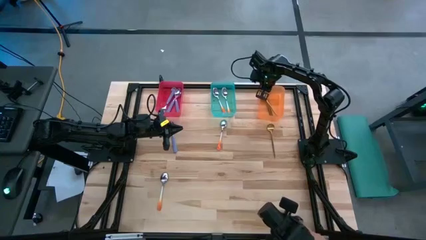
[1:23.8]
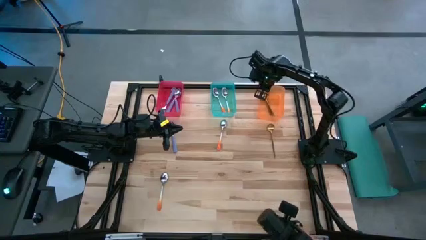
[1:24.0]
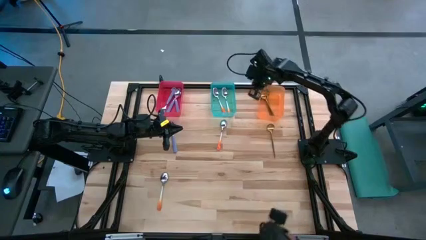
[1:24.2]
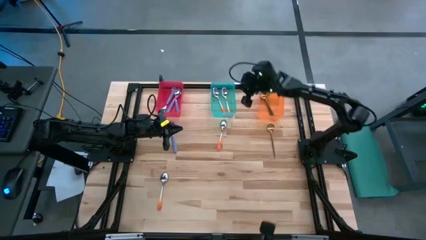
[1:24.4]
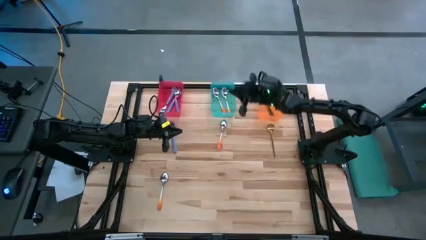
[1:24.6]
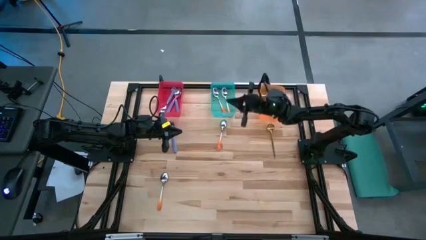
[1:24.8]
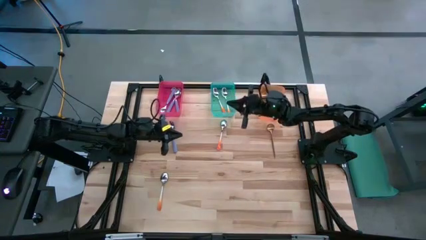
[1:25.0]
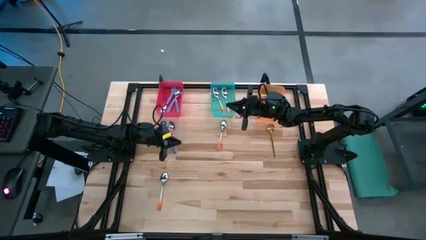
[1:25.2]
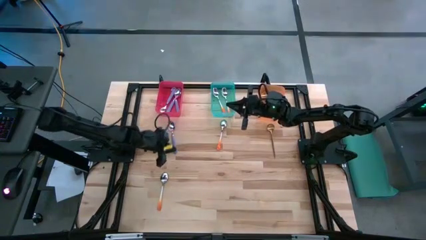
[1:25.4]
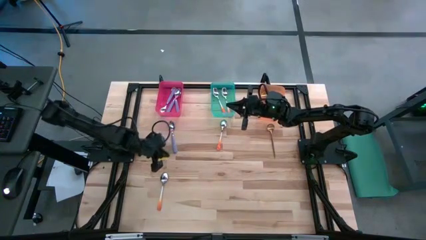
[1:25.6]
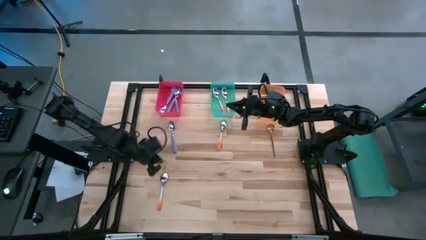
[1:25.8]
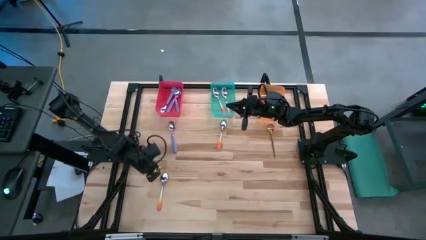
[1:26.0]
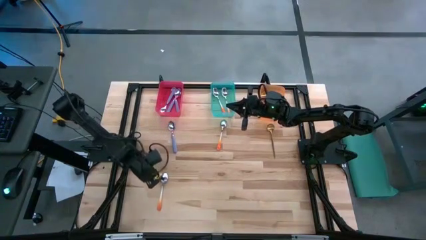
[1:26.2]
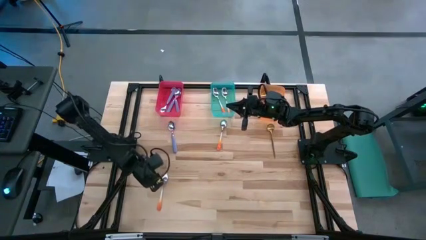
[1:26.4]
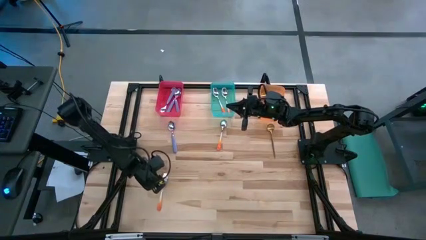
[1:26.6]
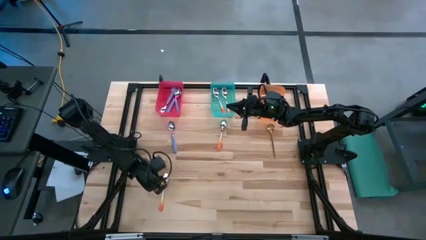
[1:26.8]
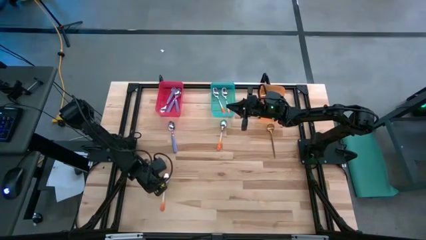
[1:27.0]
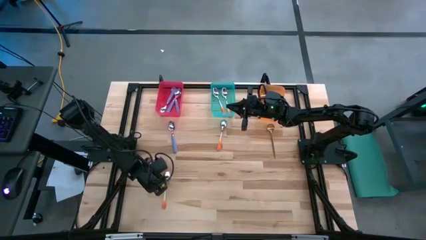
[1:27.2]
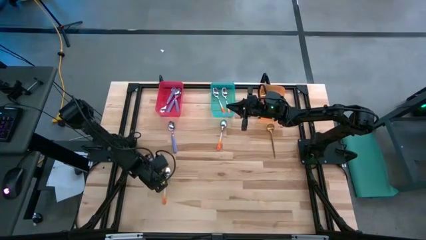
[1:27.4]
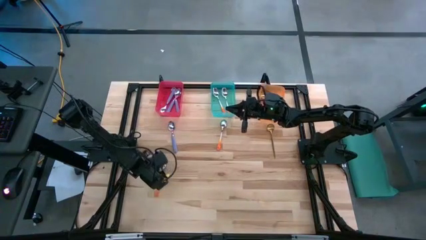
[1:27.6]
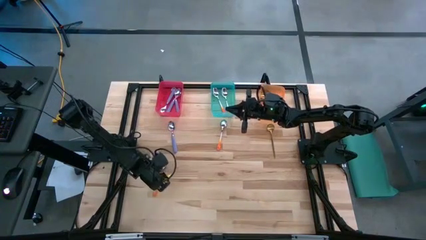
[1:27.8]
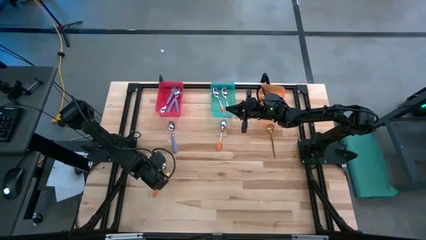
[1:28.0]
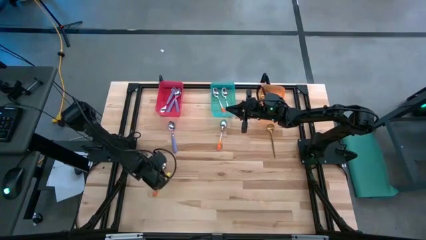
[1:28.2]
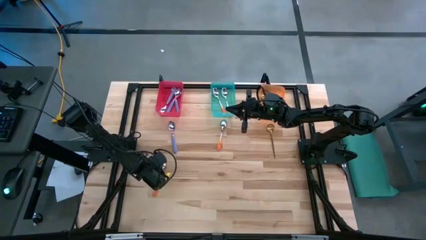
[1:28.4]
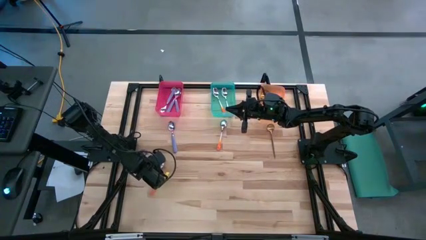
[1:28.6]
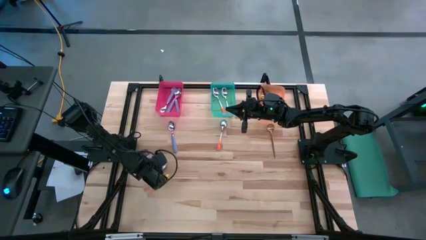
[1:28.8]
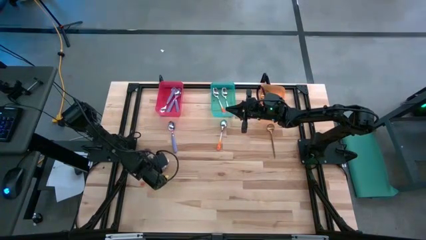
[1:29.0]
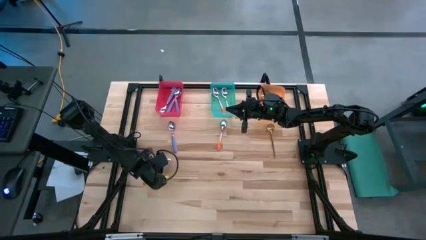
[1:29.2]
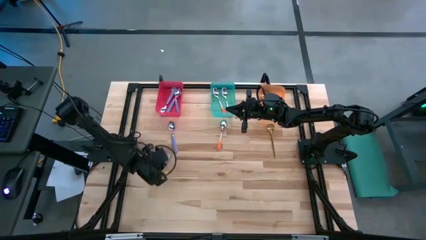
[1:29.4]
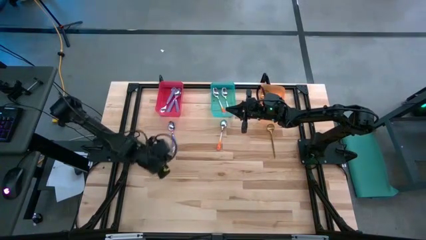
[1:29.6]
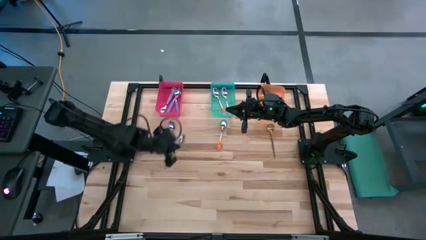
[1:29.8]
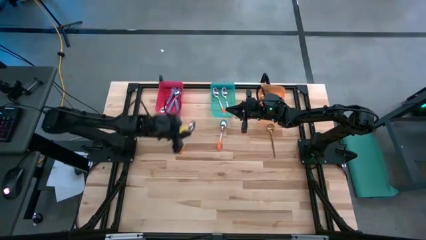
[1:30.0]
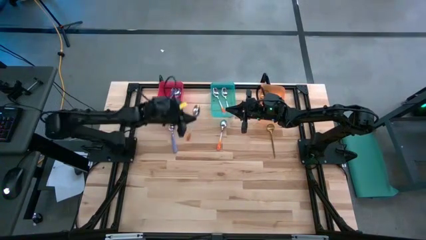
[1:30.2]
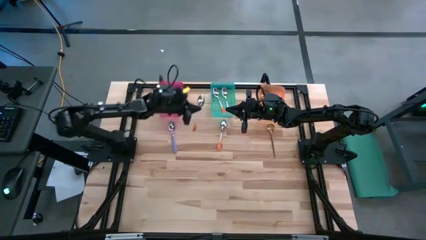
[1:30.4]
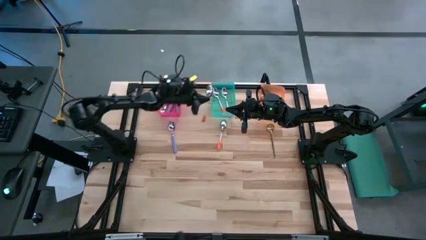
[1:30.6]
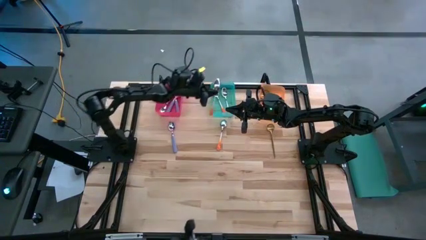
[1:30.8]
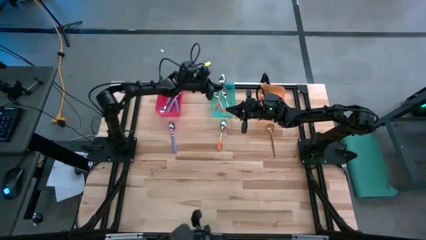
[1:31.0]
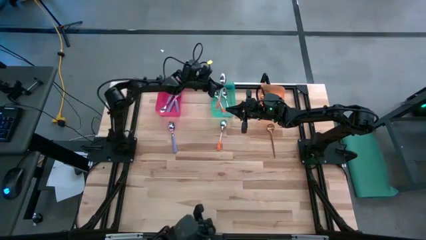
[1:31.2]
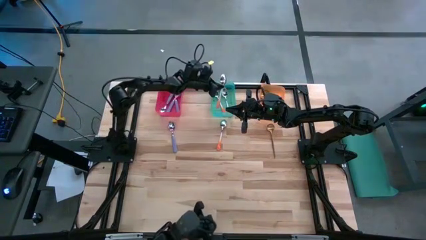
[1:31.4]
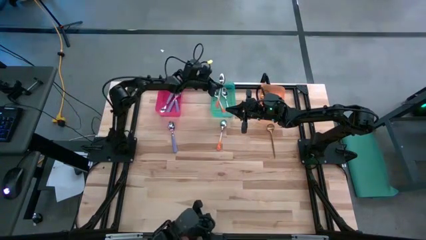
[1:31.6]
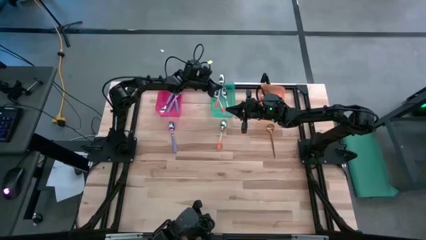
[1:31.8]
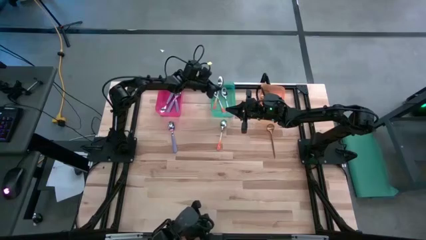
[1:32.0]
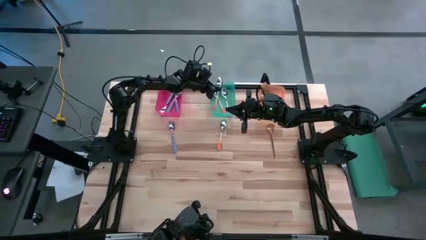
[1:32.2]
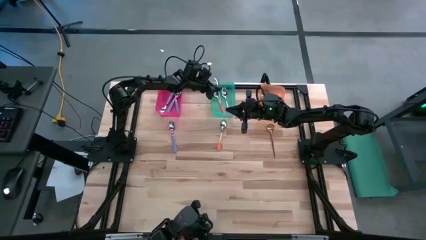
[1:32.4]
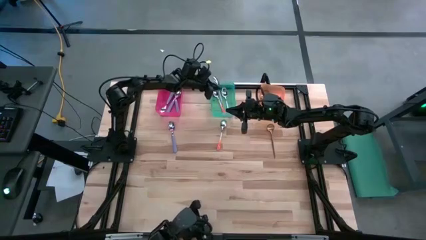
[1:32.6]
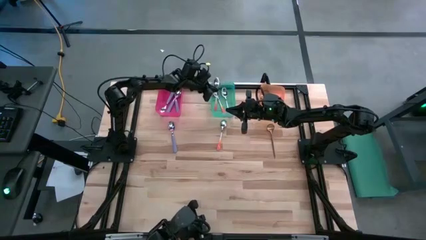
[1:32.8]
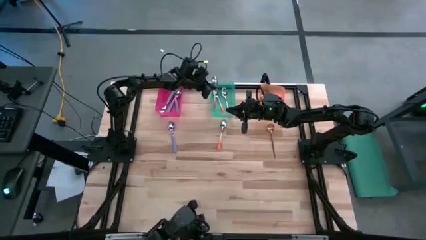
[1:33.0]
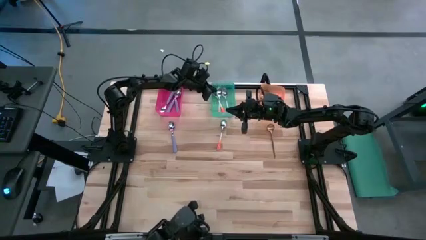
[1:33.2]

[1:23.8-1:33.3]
Task: Sort silverware by color (type)
Put the orange spoon into the green bin

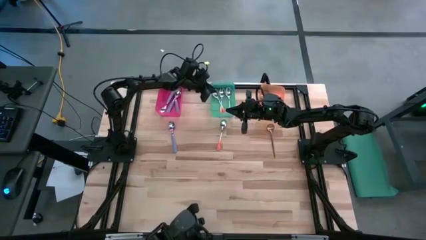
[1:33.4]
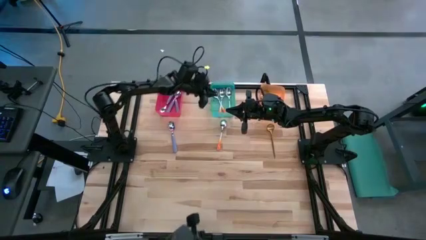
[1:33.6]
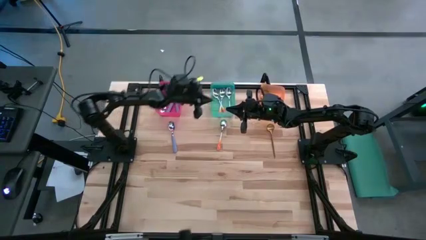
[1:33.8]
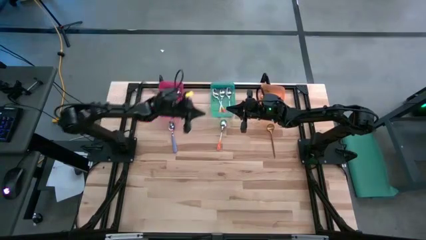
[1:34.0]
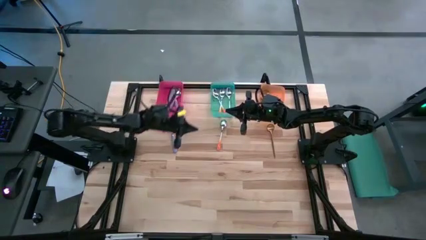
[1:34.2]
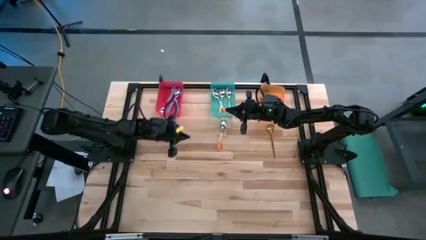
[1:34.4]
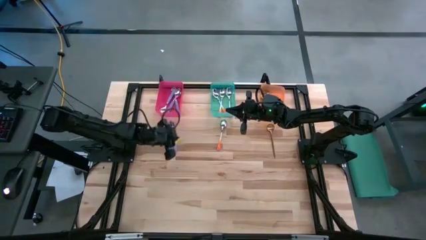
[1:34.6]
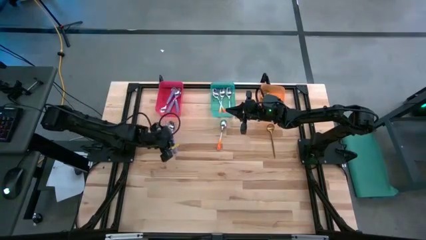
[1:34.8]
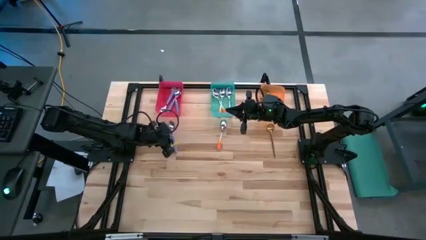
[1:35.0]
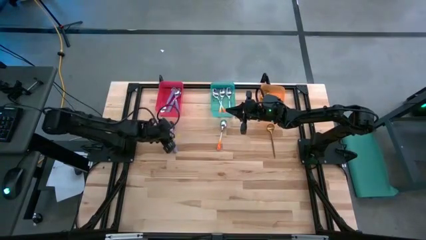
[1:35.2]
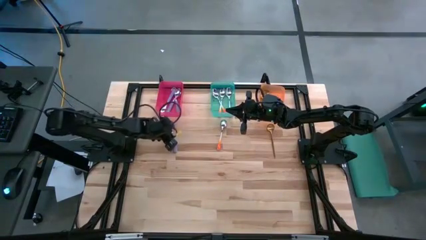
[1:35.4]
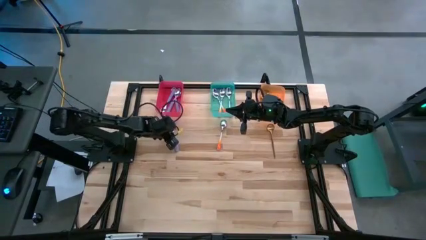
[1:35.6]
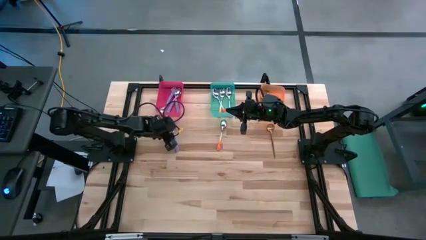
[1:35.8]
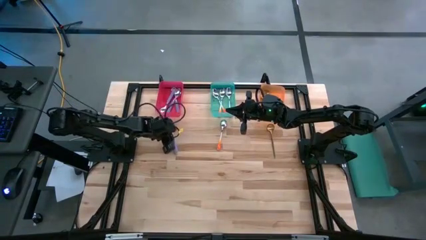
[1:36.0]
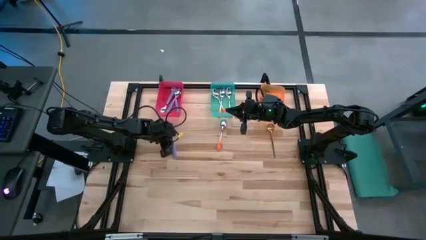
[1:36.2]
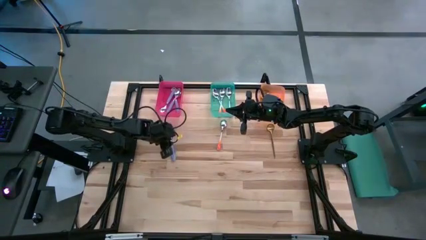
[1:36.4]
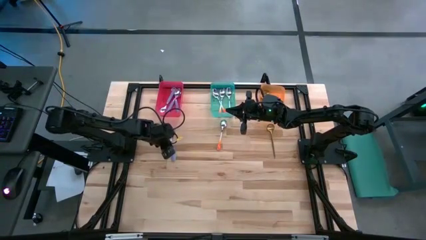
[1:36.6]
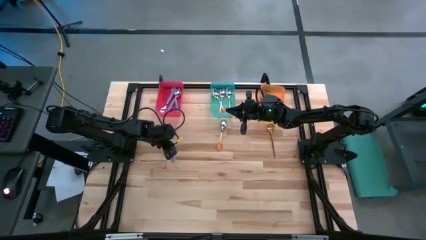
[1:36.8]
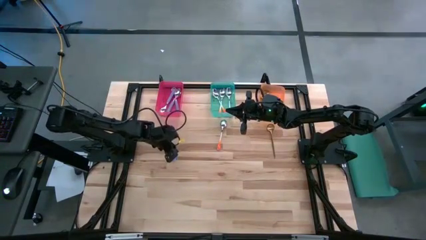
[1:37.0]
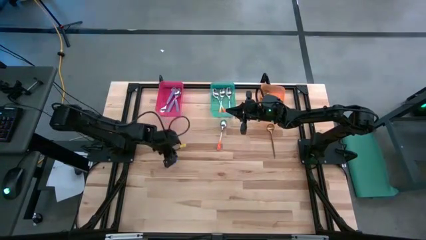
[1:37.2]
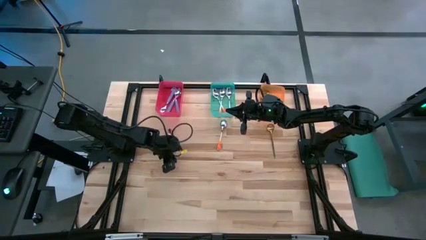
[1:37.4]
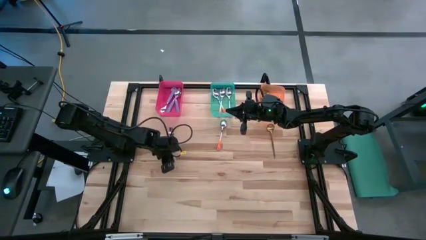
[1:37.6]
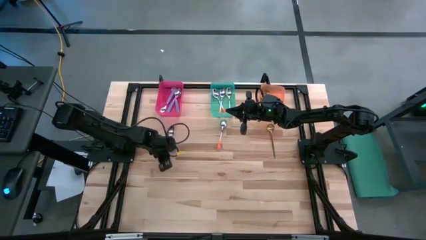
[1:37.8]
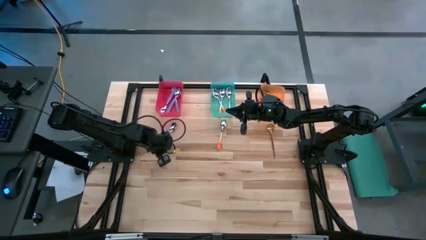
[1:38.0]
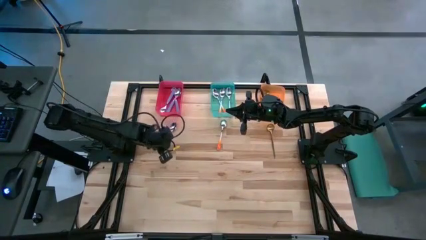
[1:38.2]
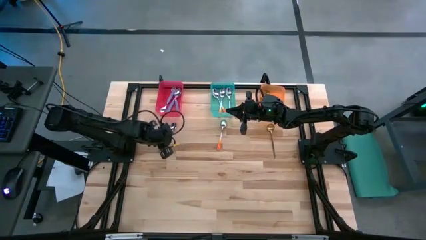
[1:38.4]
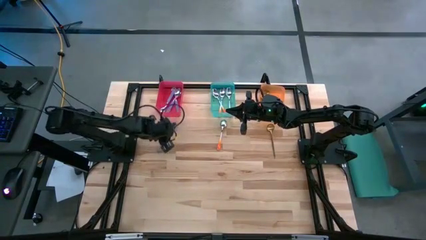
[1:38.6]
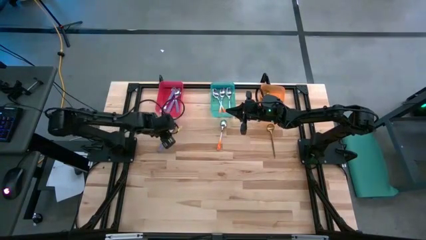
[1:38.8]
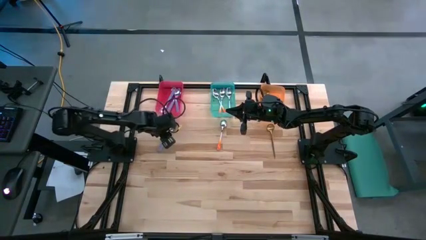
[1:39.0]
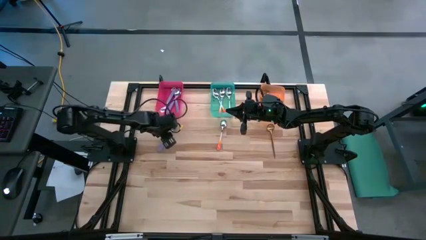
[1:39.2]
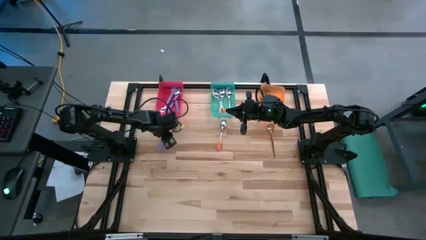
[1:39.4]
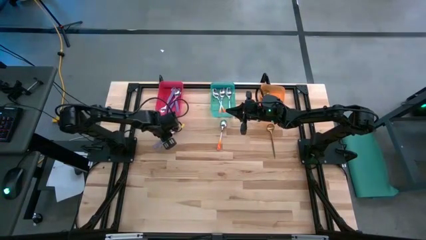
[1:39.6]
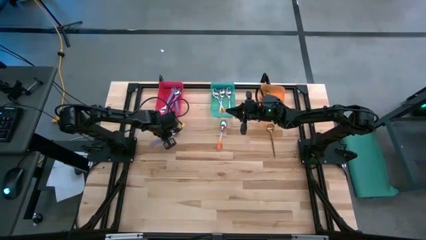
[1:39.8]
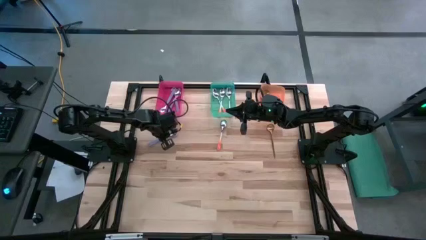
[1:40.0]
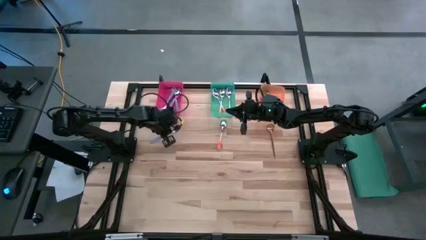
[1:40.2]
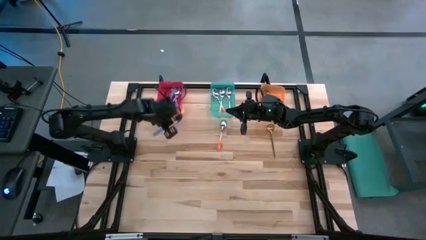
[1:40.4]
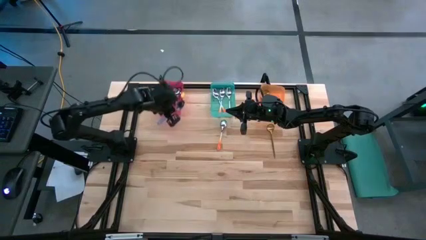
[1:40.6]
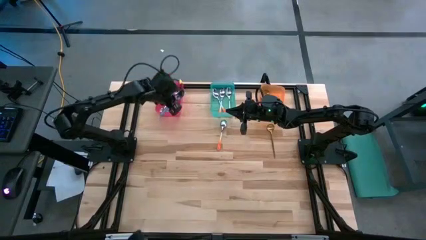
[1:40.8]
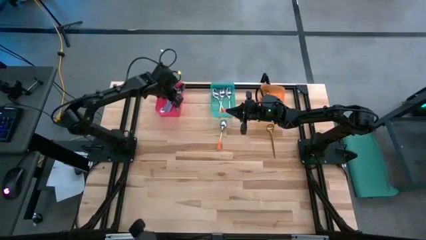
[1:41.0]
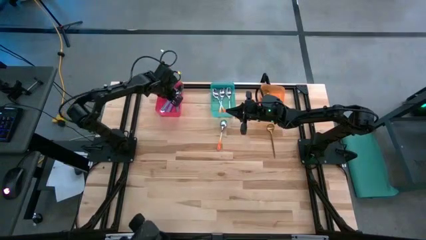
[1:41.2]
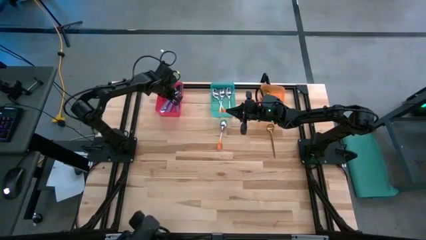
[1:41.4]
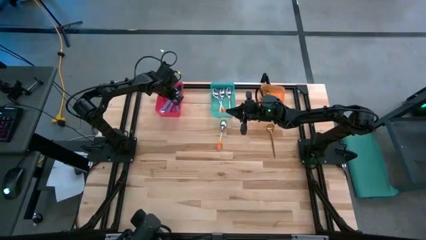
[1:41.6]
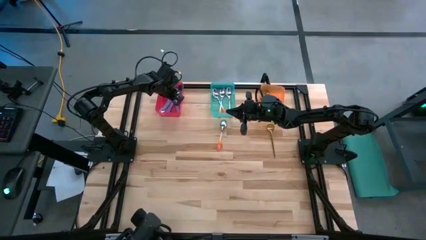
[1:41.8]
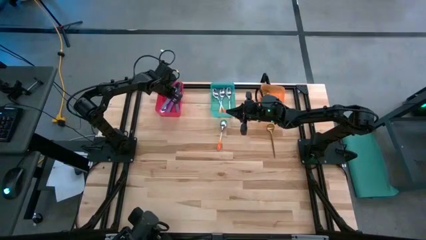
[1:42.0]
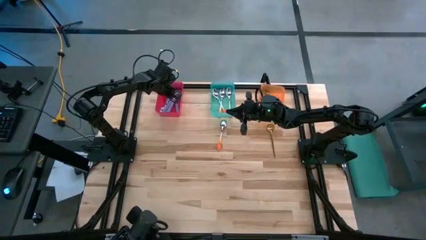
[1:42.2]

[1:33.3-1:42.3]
Put the violet spoon into the red bin
